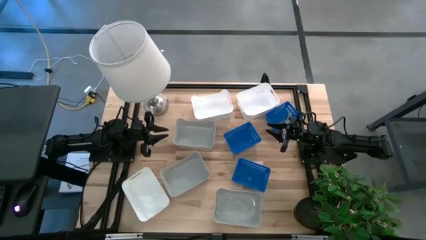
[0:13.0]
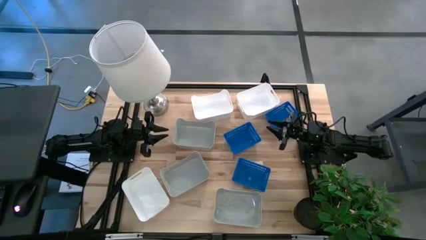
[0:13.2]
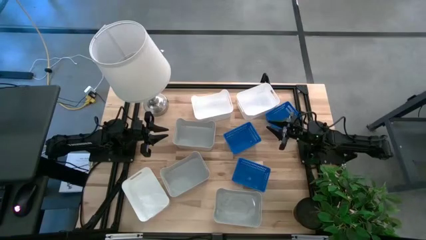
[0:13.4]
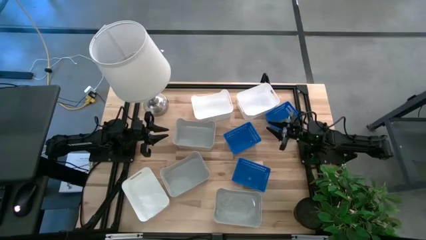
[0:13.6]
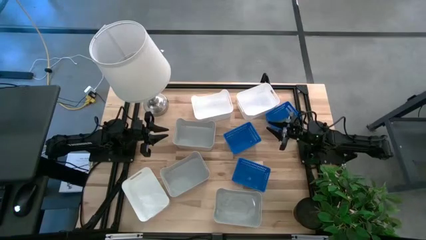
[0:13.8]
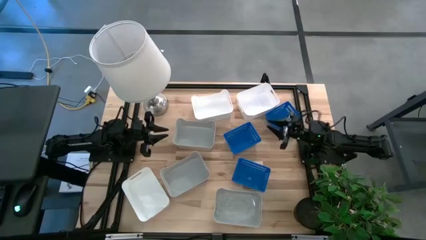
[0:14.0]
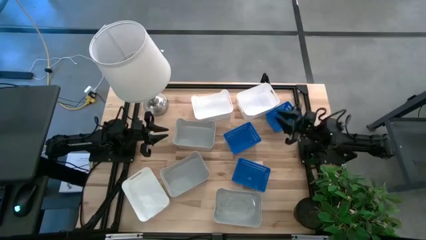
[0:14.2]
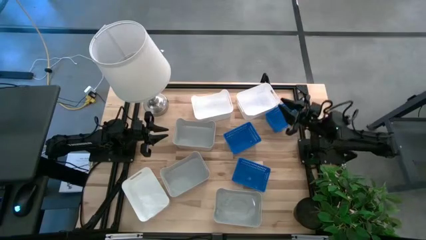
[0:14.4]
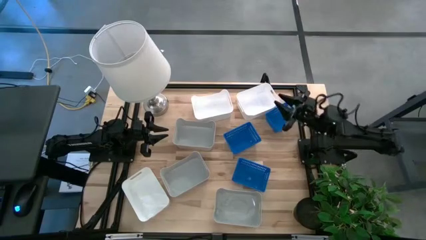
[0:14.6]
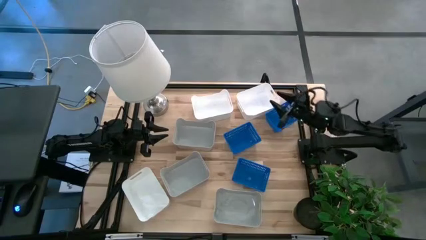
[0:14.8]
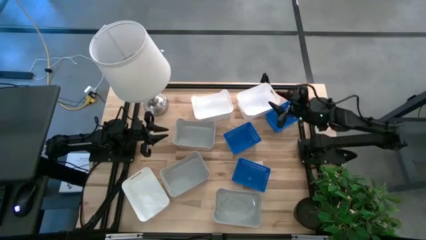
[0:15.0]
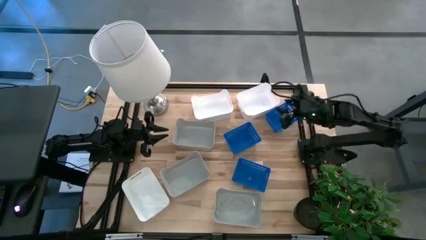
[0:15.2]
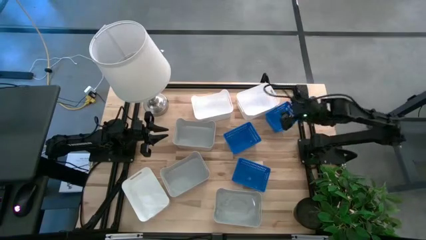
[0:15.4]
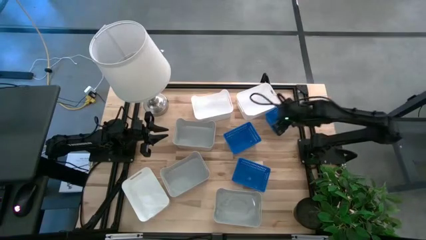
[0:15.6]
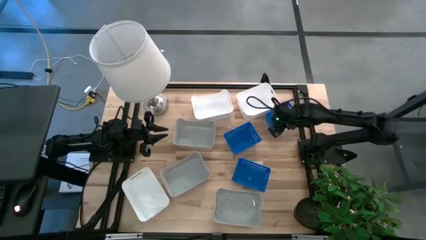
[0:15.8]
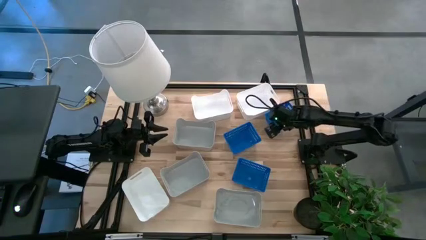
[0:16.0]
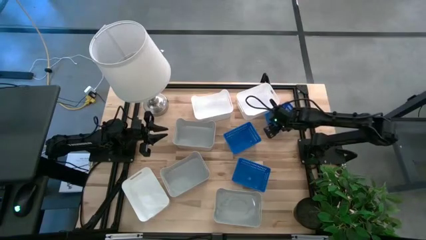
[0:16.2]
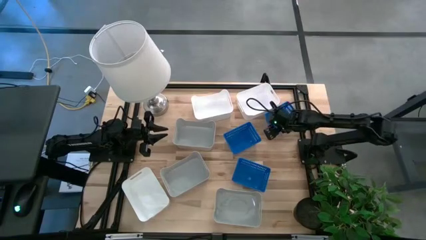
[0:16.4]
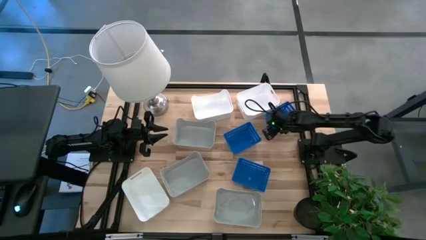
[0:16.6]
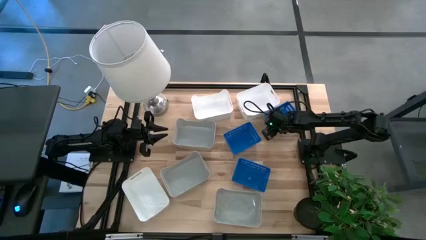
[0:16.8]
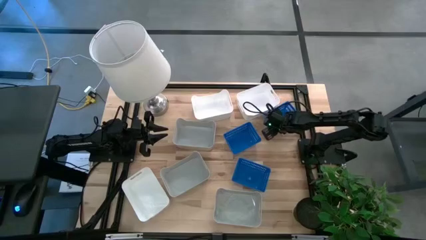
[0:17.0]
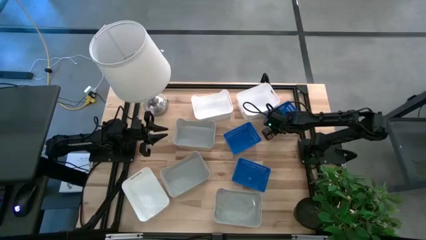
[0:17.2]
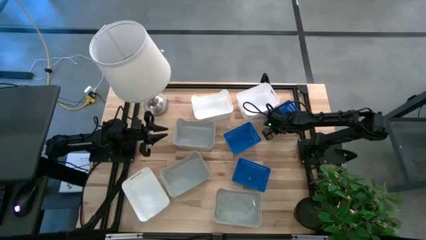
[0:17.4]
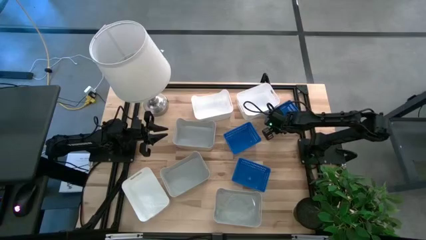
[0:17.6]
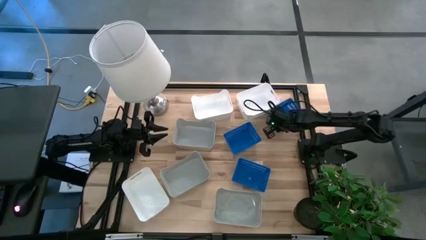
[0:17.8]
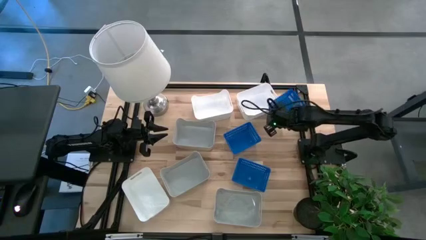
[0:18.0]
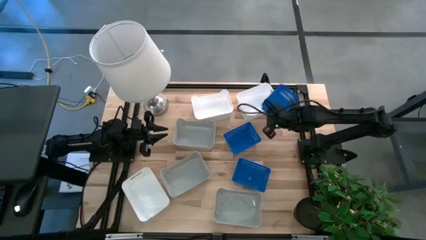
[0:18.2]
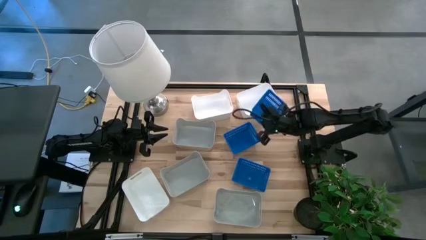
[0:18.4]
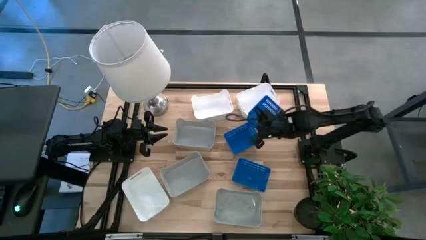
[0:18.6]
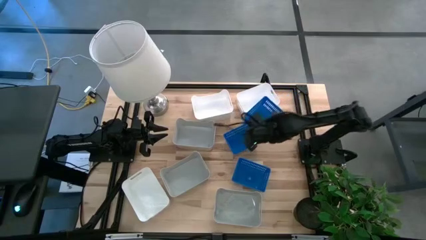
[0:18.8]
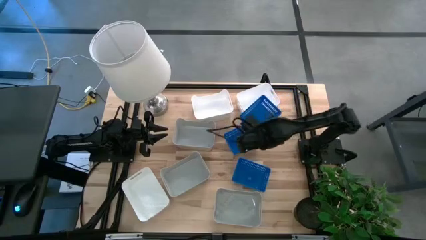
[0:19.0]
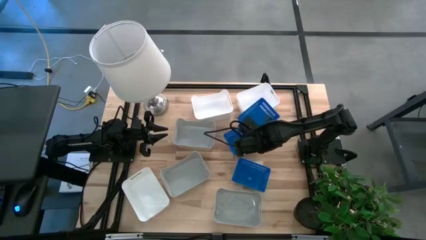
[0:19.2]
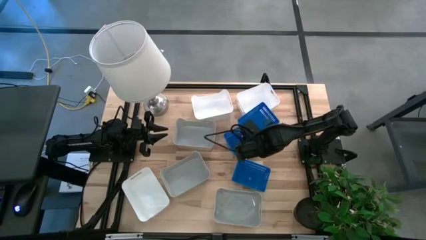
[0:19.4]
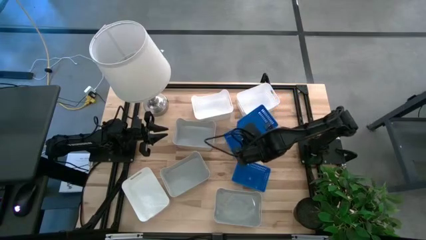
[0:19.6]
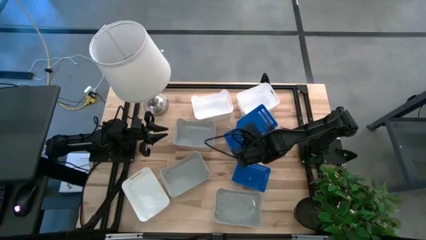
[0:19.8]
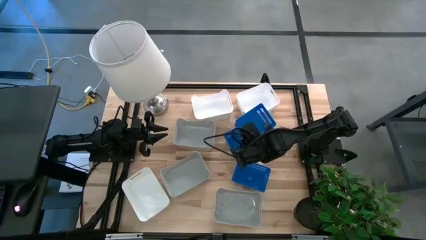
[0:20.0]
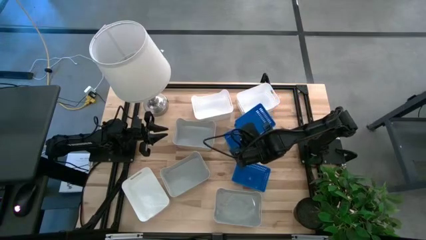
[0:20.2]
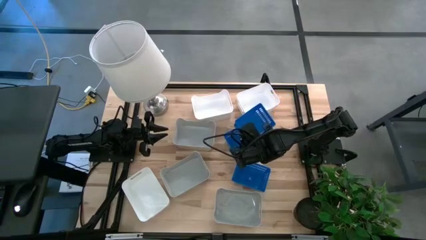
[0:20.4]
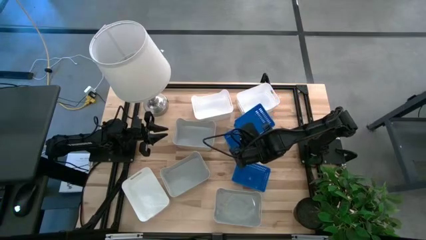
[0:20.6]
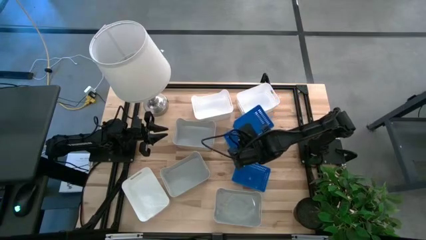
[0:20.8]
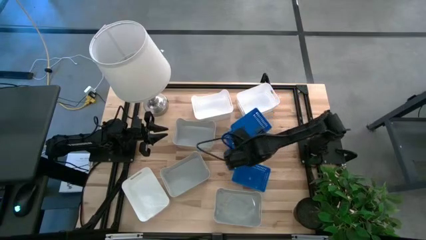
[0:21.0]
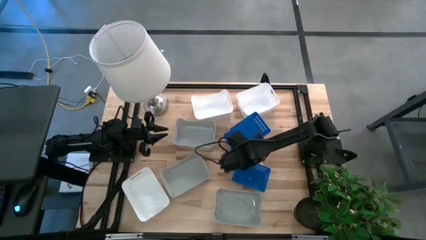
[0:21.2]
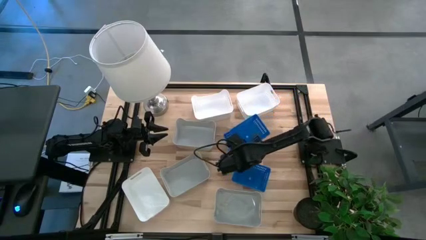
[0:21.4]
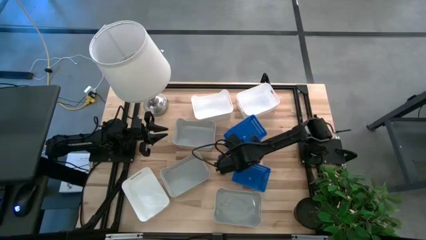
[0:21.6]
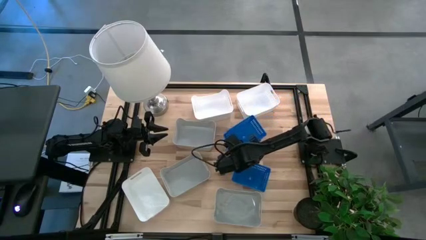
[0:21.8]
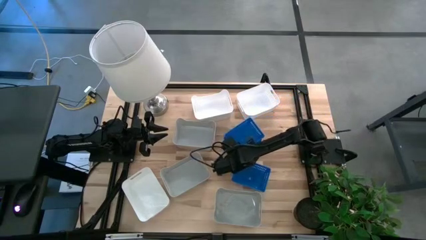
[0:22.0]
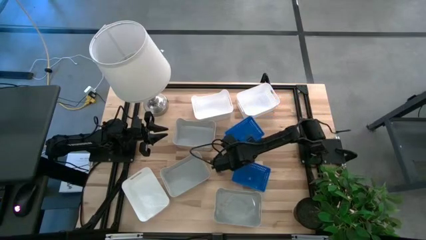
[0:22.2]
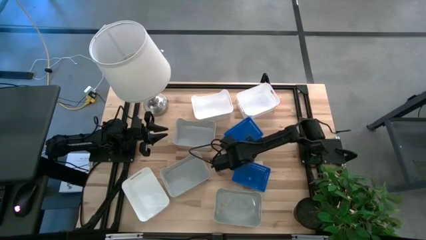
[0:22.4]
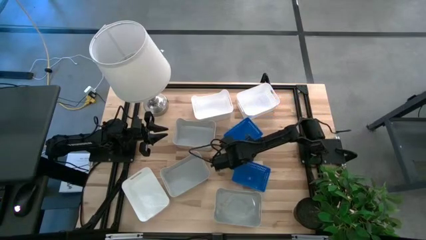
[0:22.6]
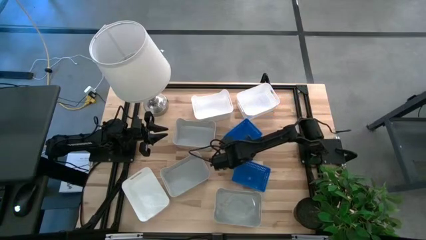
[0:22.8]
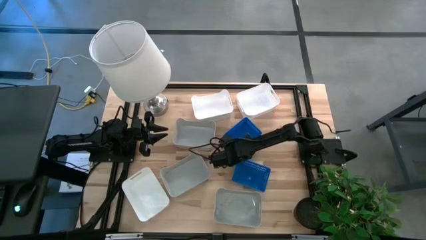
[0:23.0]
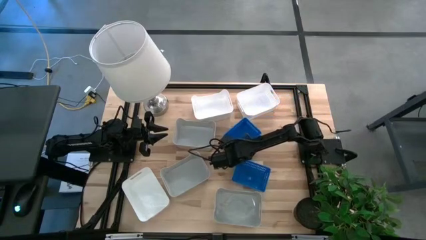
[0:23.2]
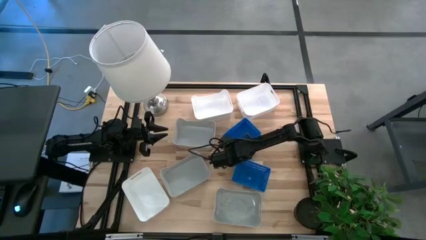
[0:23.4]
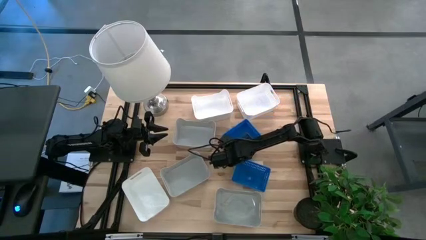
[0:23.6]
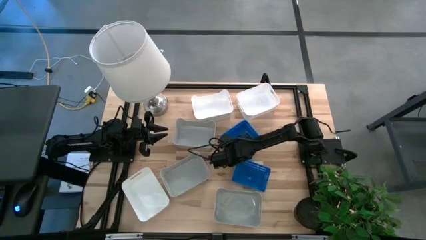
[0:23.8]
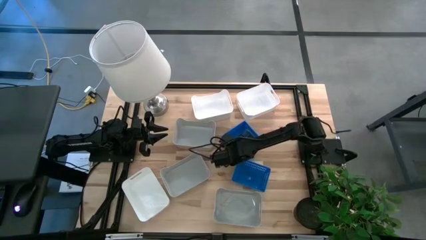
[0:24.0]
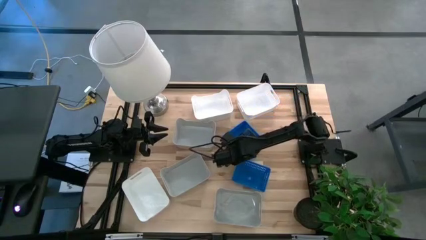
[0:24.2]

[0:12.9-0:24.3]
Stack the top blue bin on top of the middle blue bin

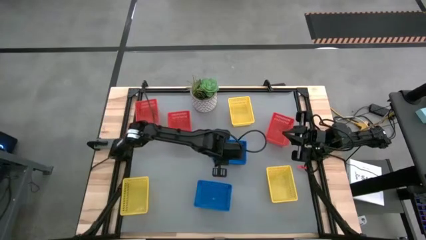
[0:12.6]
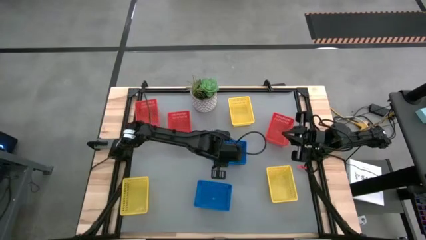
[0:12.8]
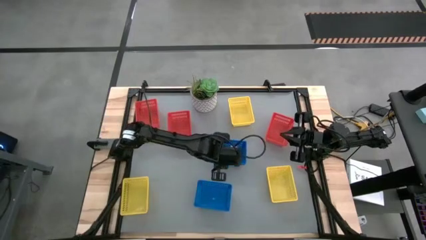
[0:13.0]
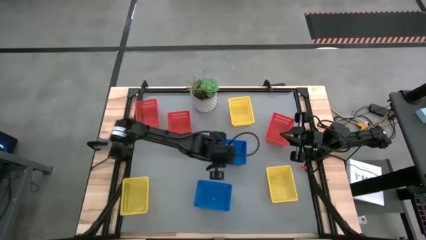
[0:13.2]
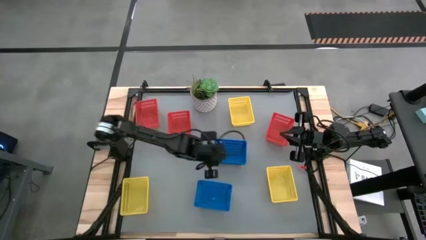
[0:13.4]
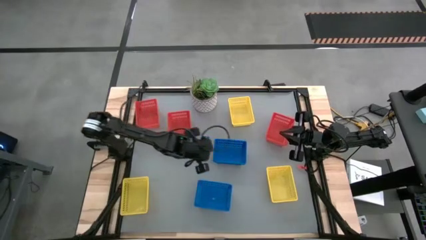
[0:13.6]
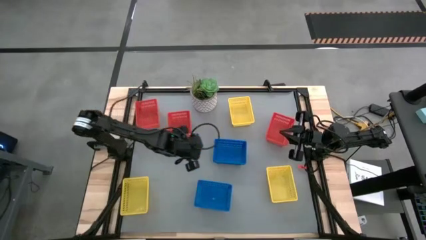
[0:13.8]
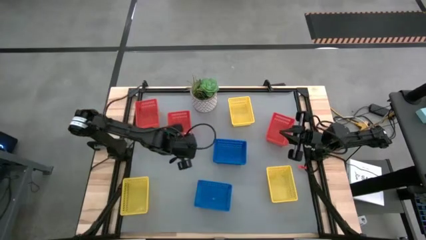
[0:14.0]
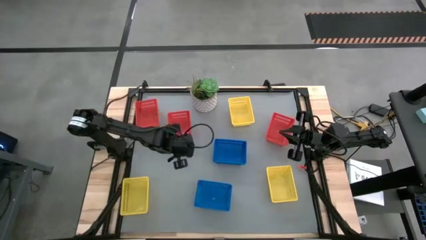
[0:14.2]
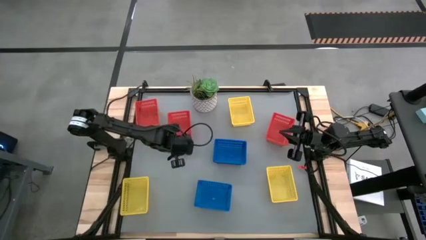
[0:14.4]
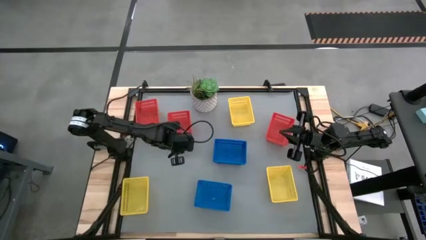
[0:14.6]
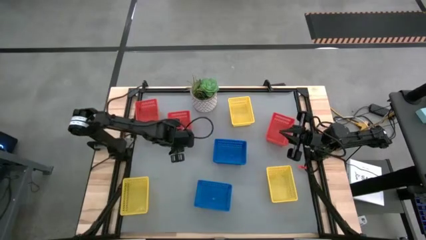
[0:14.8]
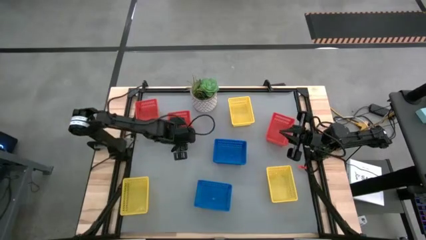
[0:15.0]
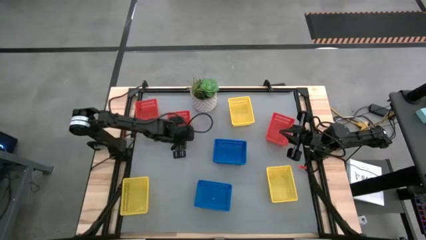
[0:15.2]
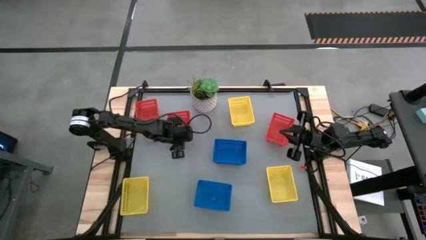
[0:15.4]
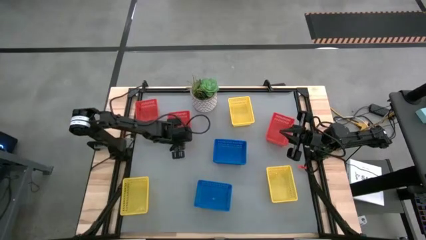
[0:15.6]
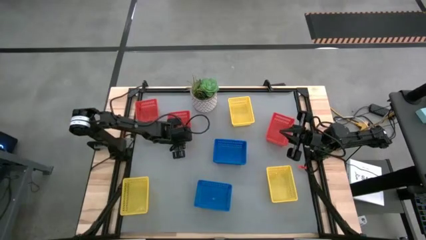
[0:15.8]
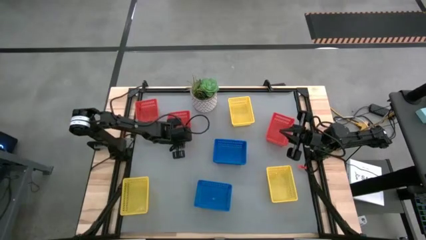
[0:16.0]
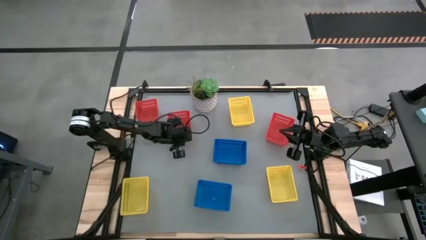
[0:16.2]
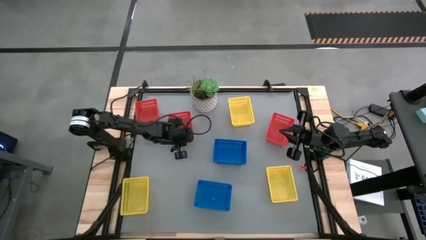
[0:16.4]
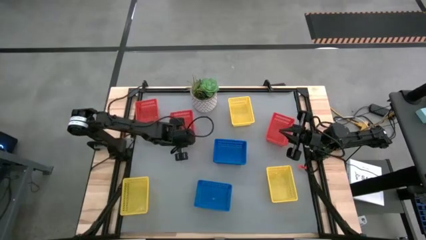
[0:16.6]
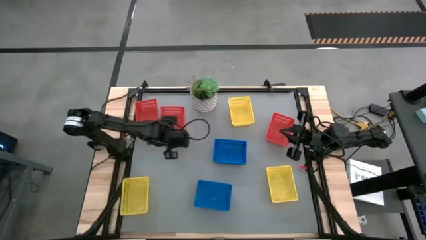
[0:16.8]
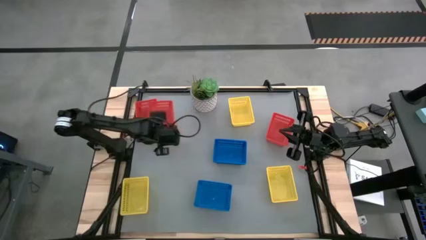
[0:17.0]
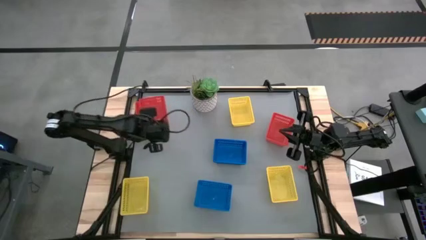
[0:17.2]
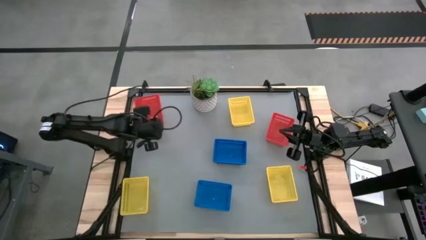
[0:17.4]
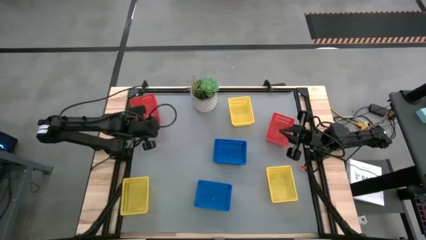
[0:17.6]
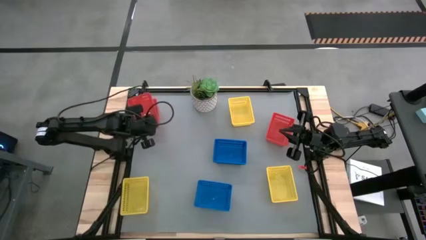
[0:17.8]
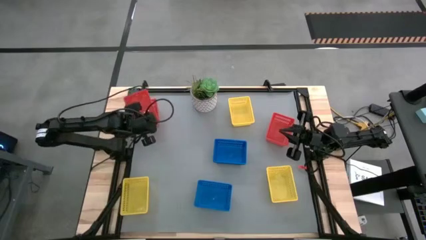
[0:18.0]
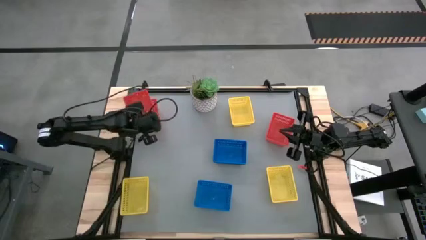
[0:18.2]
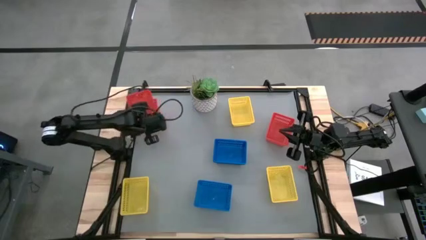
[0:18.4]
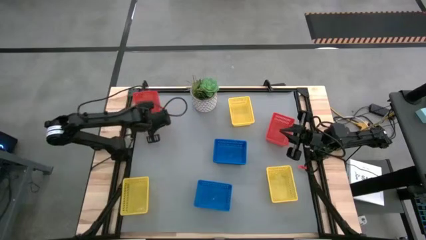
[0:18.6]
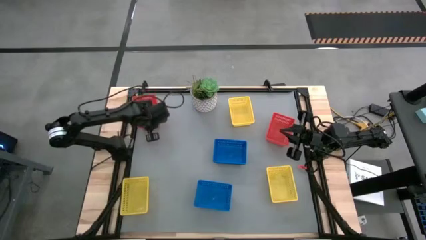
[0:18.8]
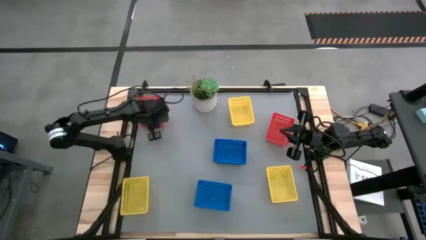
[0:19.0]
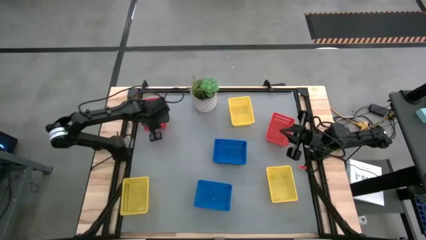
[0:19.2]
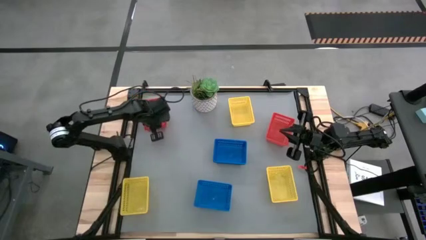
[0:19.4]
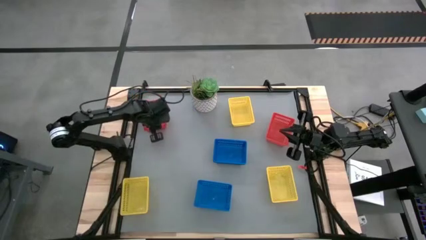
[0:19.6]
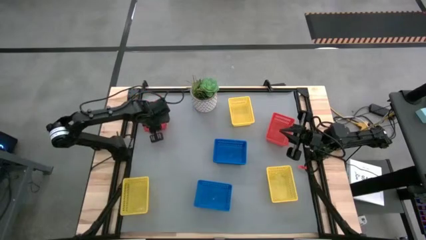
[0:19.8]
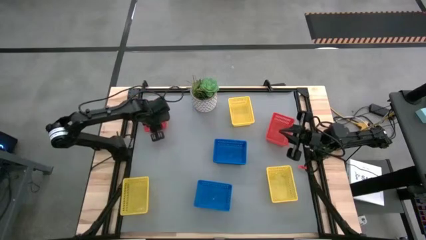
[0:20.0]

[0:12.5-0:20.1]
Stack the middle red basket on the left red basket
